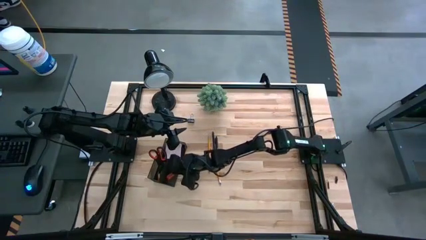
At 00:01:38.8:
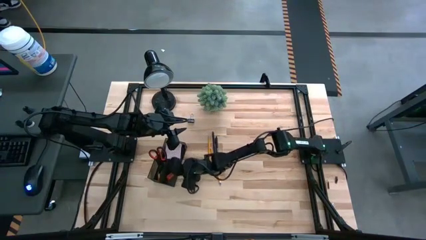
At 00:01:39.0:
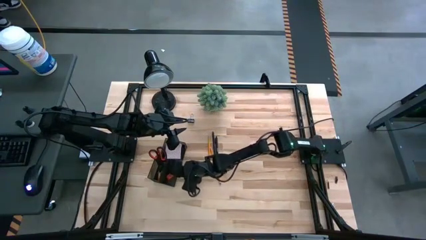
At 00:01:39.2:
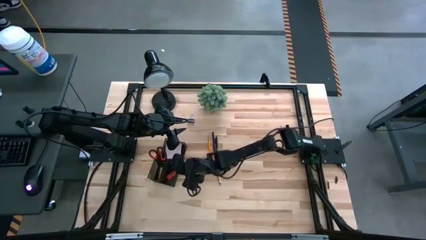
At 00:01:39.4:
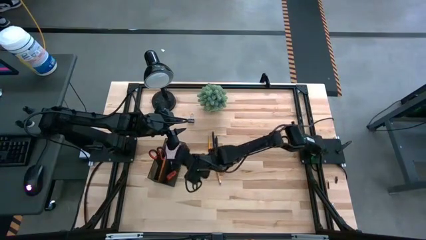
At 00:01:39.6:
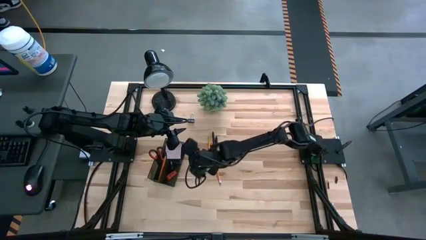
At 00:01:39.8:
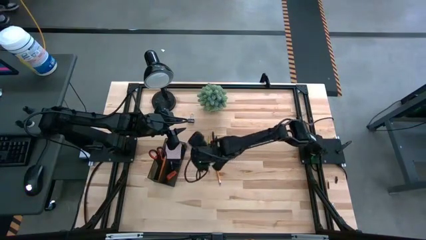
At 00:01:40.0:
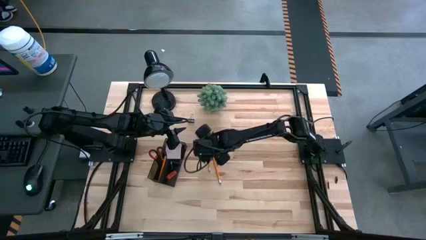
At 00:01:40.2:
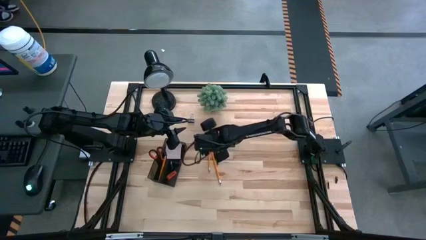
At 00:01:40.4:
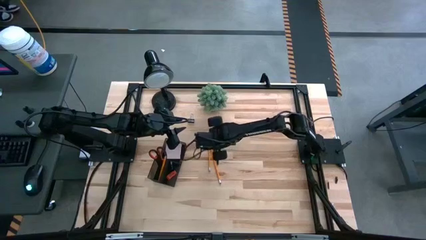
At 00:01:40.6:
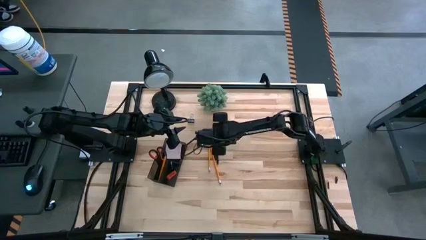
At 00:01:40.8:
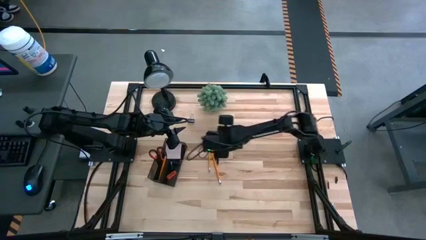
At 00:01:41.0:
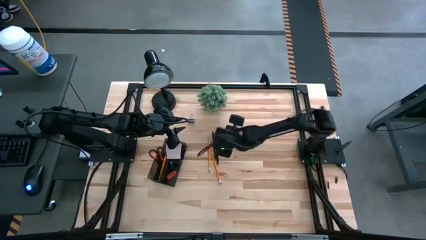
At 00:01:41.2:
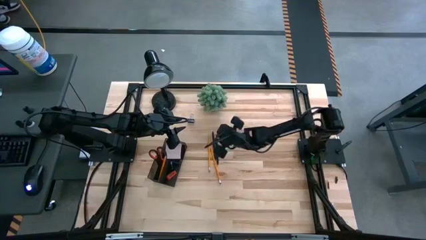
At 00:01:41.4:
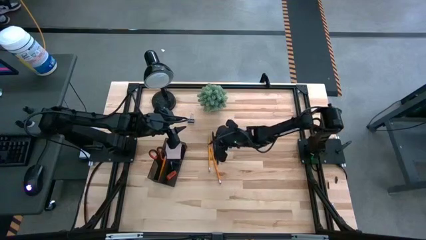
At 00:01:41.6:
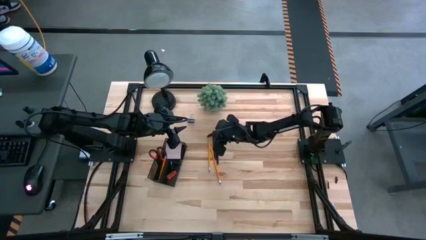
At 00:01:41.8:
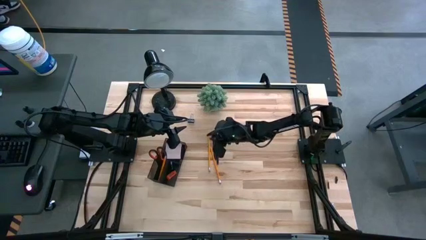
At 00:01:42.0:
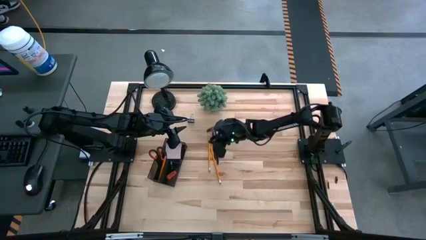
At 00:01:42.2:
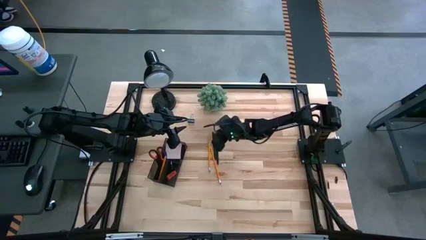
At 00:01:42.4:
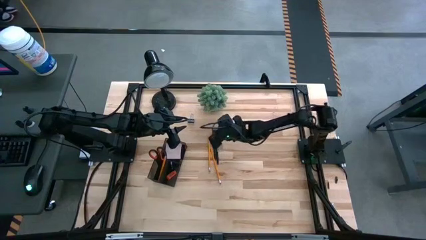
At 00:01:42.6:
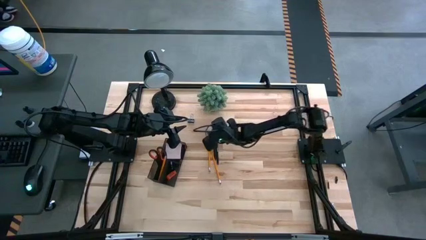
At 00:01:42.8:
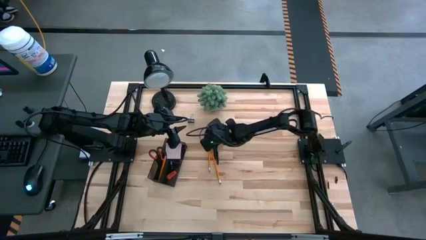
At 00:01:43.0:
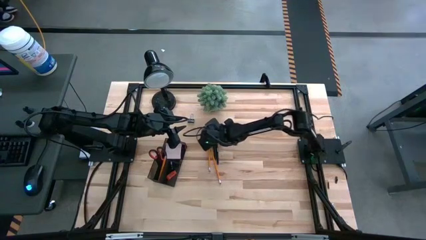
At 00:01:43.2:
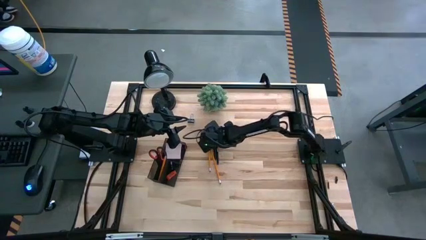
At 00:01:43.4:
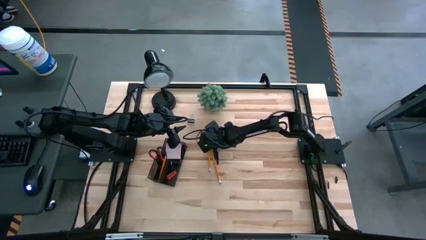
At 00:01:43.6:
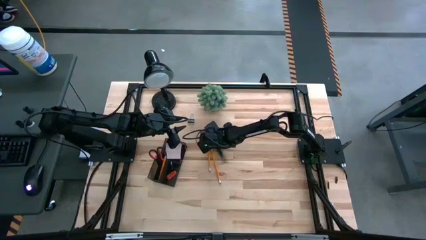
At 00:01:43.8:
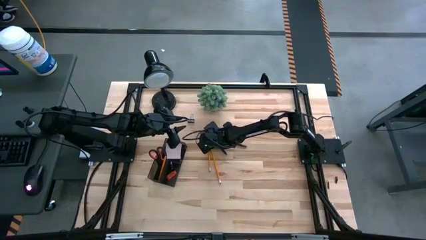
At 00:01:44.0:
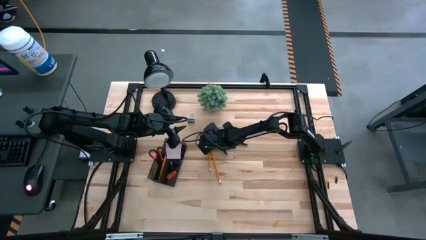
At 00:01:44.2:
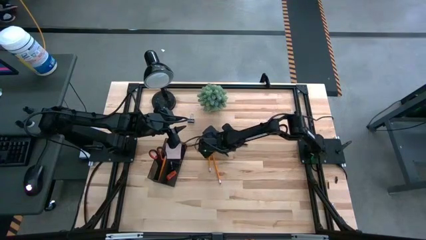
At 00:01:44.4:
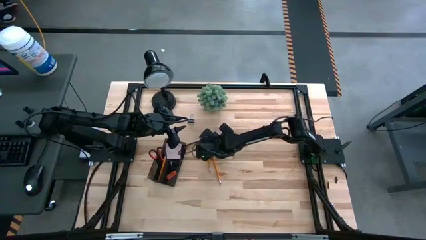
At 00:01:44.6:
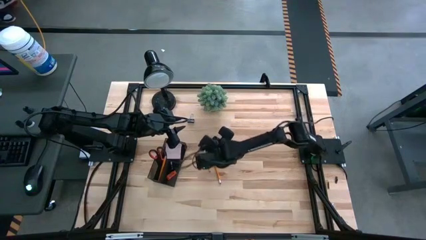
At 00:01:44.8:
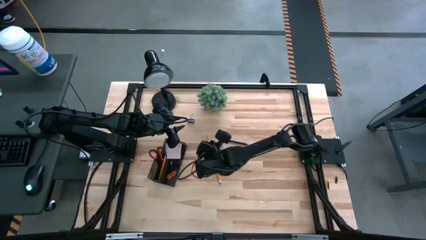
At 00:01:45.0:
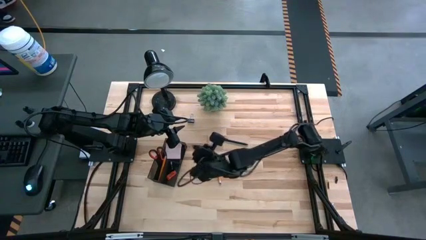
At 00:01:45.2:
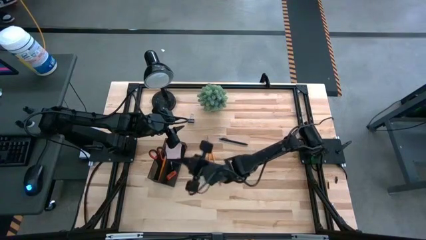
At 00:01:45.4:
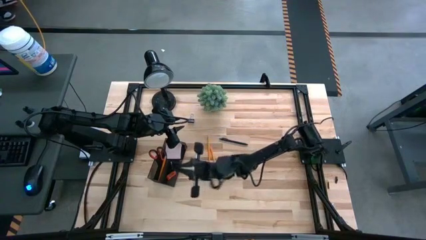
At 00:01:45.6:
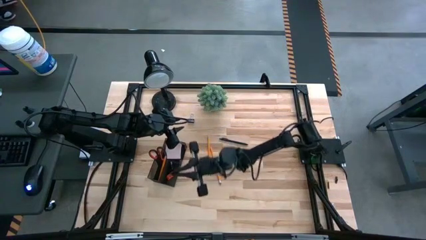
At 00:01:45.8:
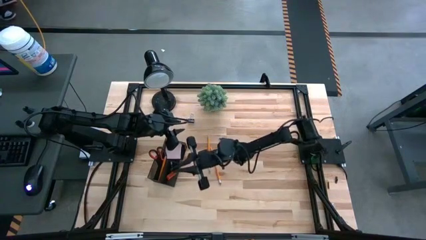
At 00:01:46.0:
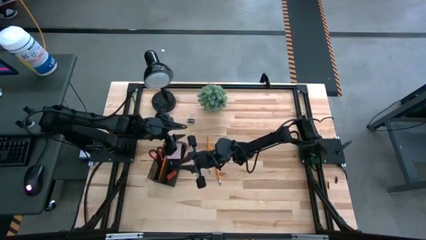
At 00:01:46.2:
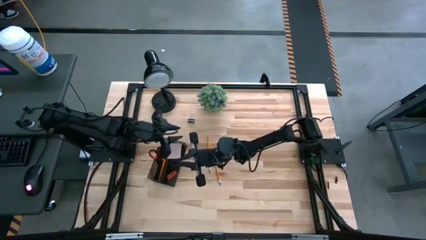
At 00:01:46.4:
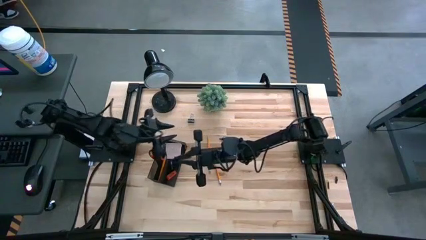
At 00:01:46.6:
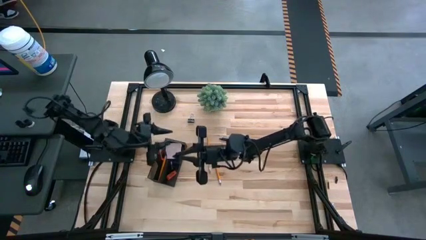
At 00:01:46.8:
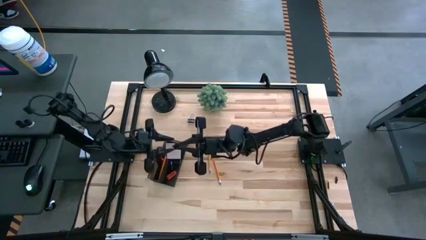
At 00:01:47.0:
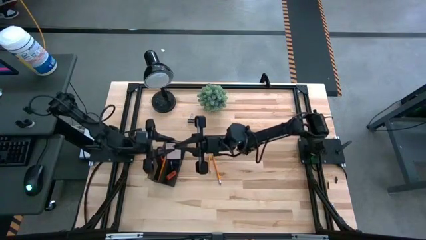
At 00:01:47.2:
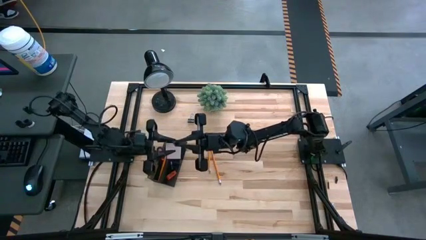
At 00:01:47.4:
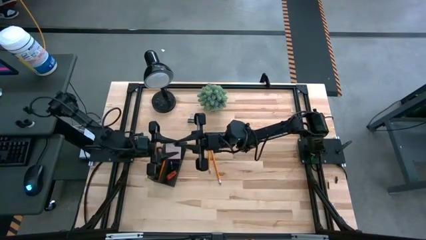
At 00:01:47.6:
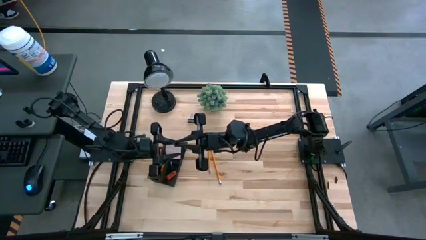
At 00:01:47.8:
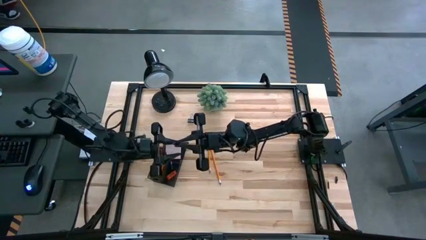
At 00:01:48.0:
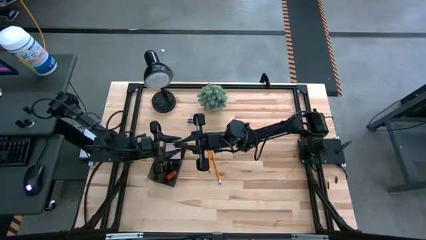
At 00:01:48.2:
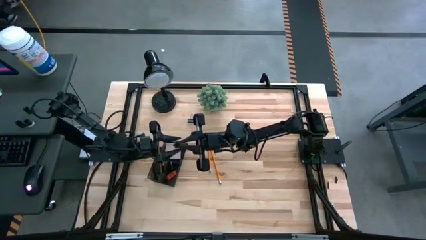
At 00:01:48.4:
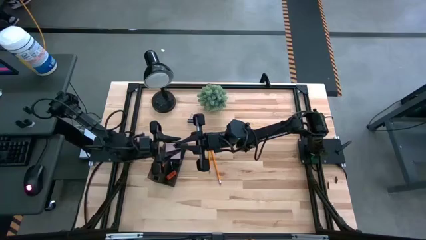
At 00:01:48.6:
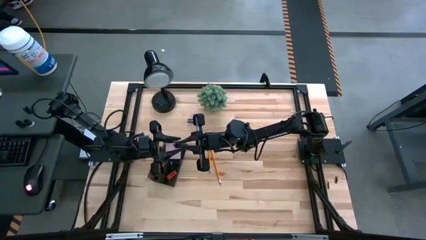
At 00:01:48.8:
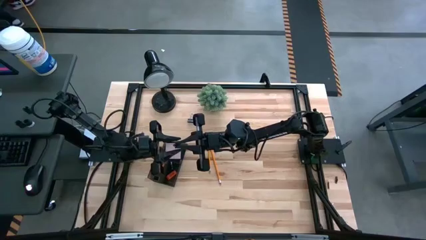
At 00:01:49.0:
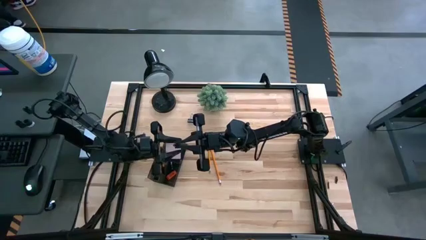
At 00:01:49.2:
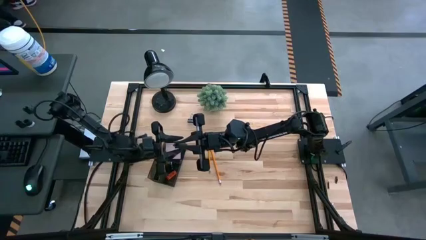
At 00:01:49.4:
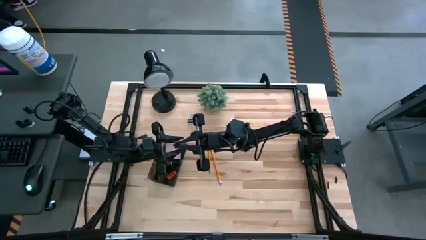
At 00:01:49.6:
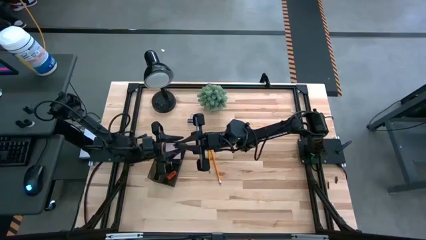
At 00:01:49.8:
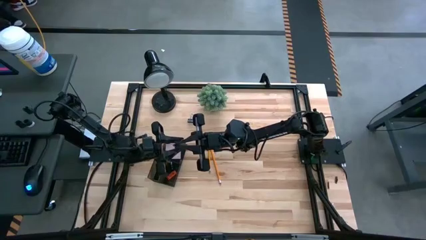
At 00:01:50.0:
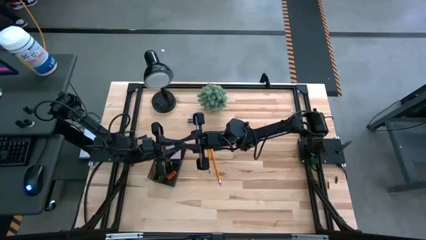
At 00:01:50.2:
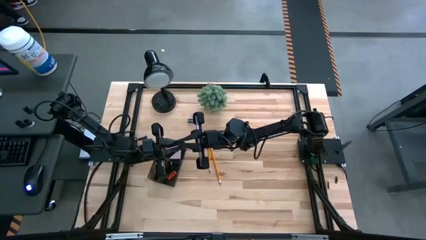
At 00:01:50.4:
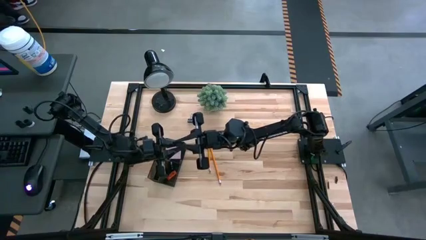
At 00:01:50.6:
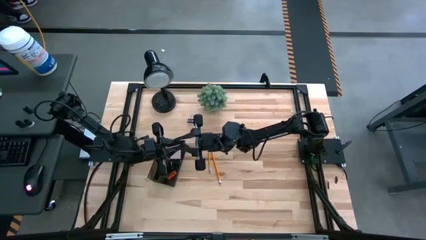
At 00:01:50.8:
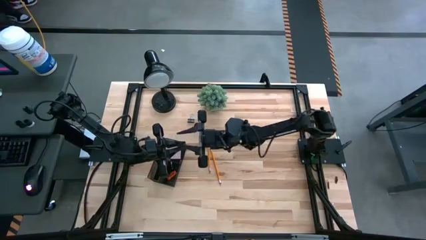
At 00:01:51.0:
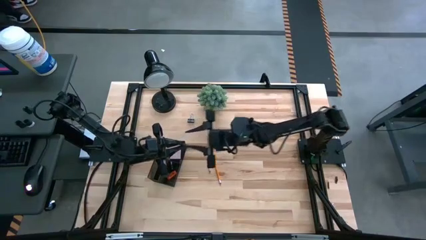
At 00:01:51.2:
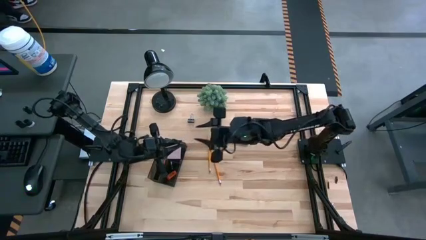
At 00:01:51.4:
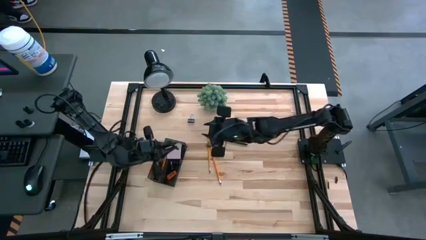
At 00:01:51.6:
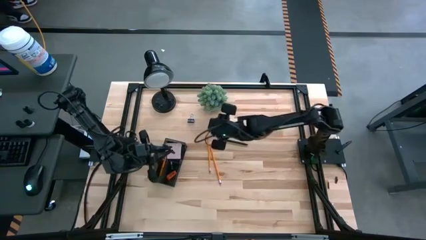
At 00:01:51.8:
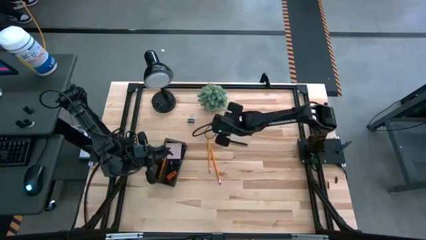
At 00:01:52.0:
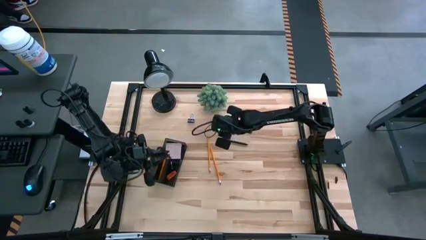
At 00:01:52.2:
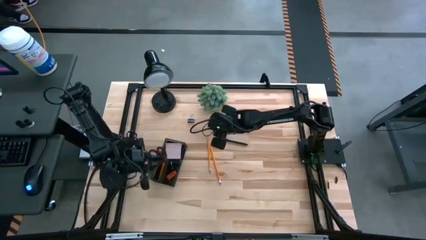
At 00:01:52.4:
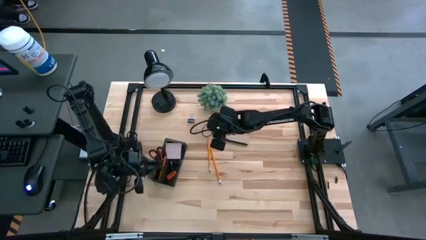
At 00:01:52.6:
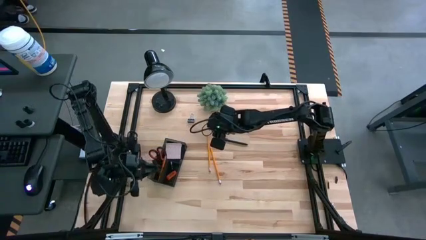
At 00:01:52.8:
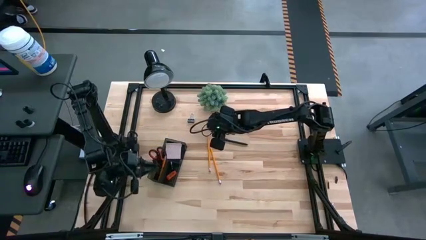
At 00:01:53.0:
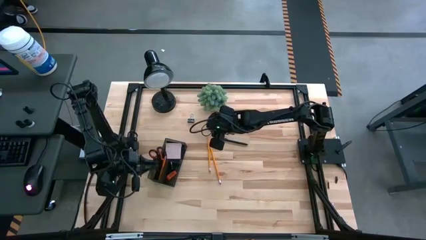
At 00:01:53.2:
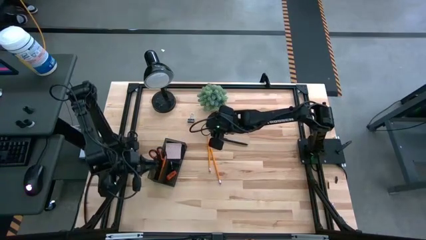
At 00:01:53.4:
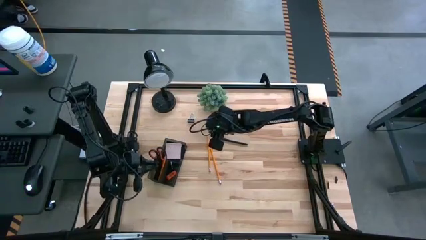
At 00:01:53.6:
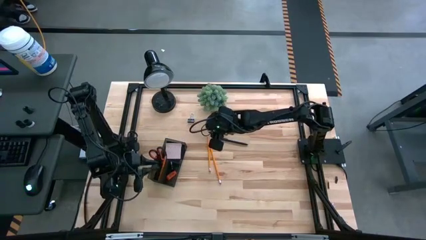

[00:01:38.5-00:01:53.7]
Task: Pick and place office supplies into organizer
Put the left black pen into the desk organizer
